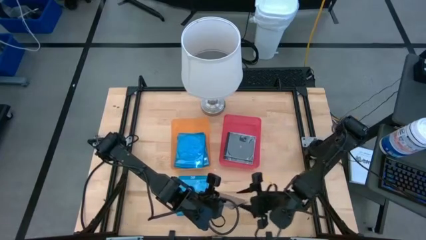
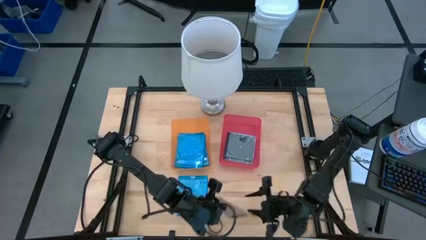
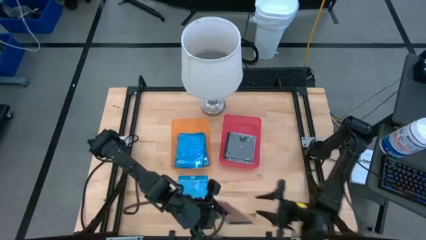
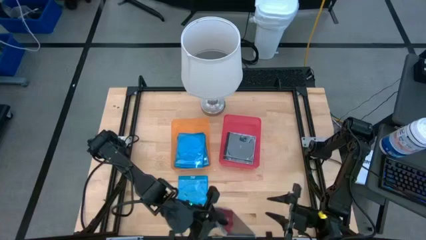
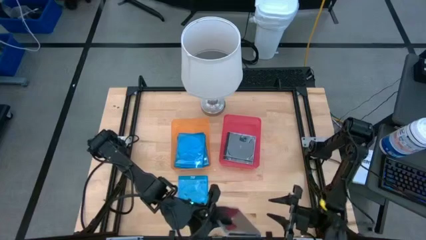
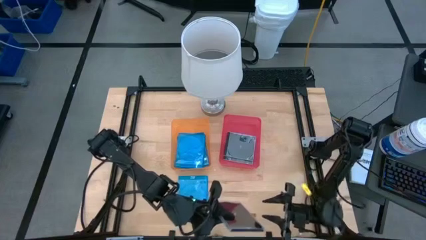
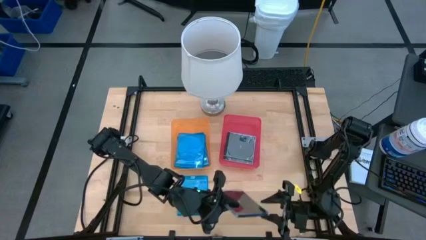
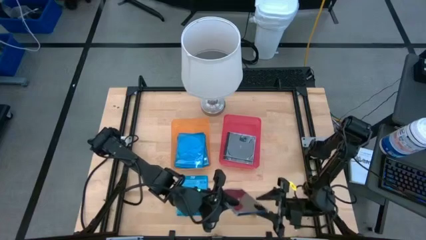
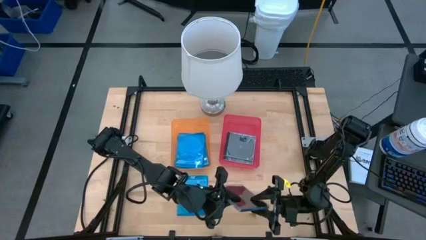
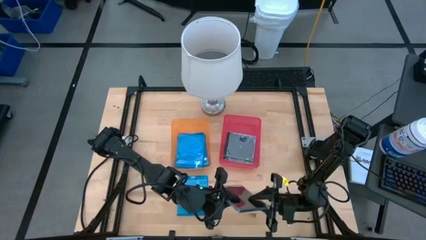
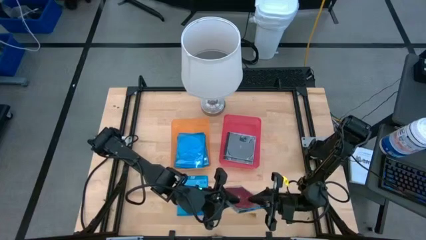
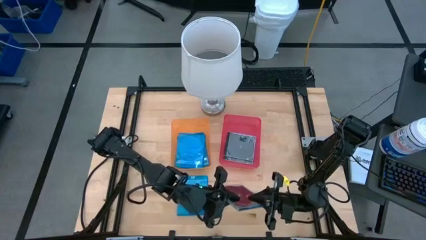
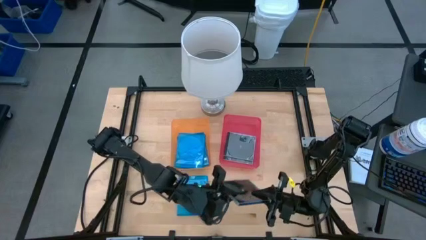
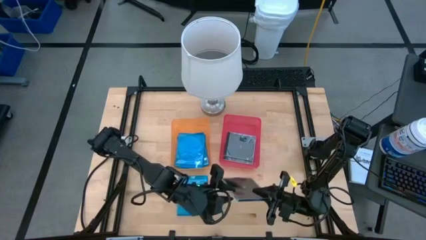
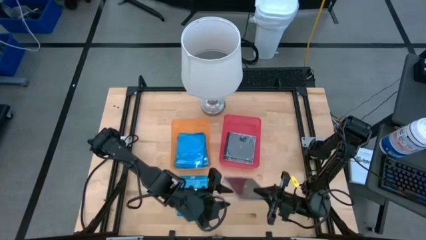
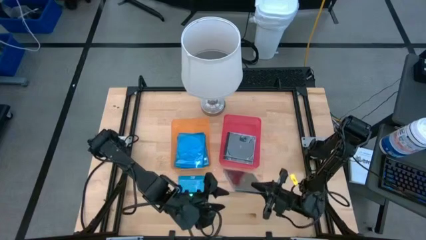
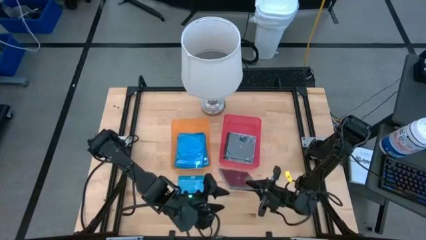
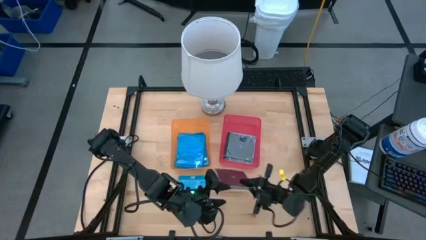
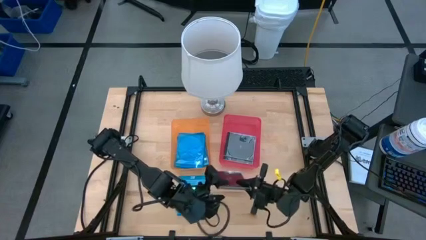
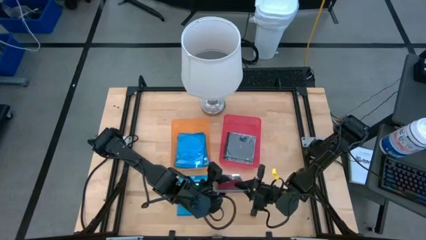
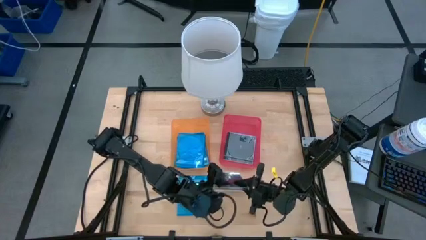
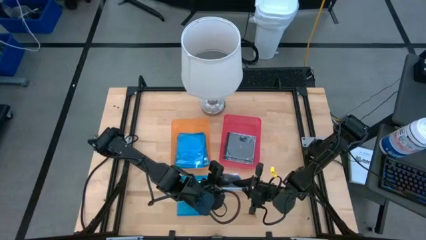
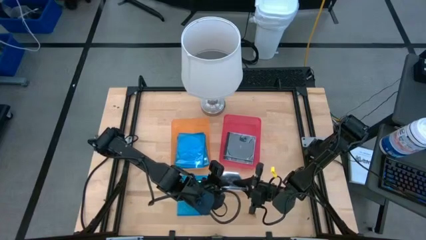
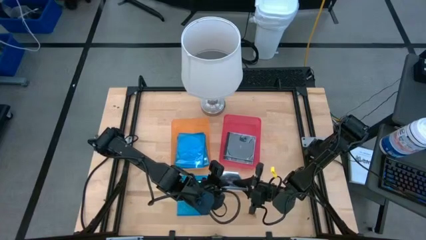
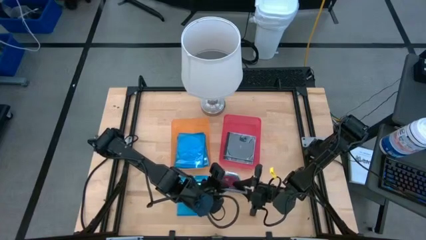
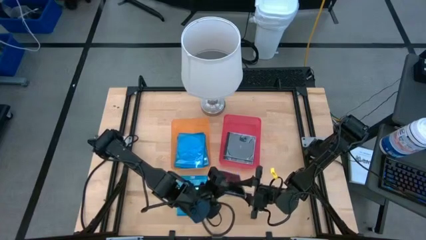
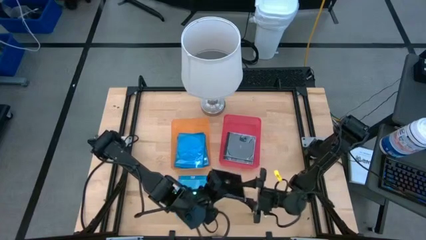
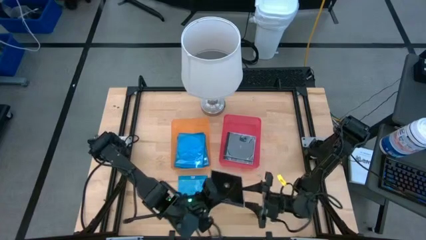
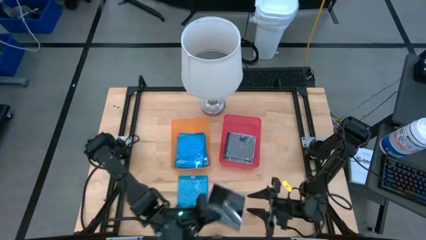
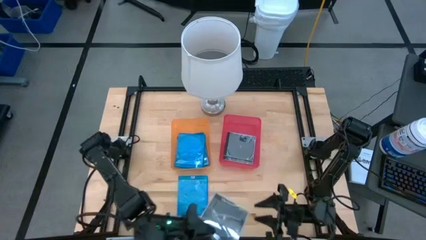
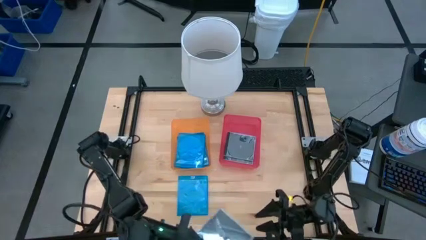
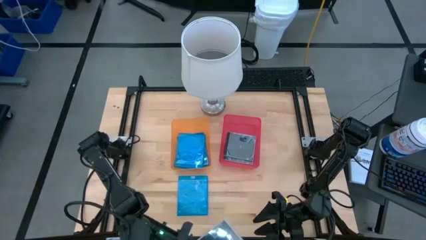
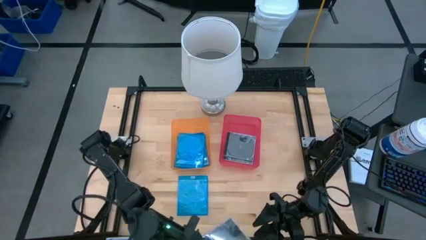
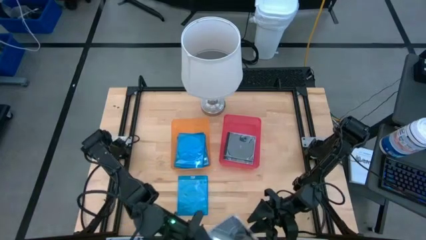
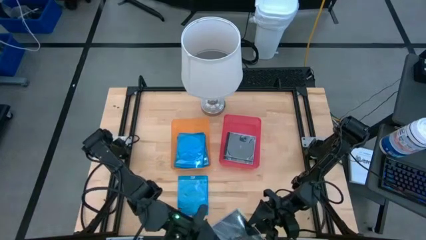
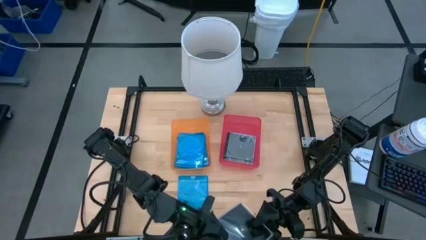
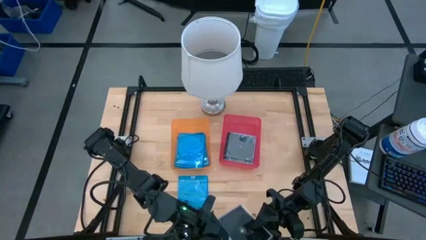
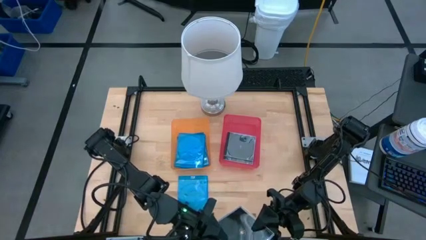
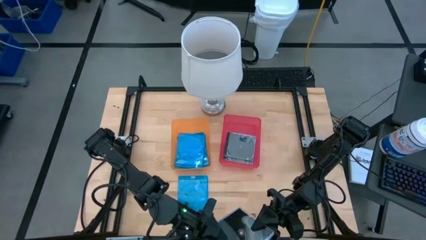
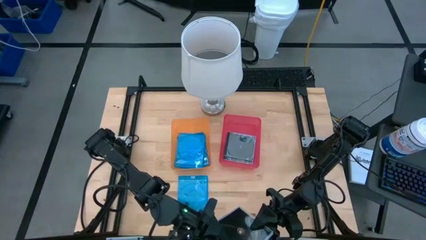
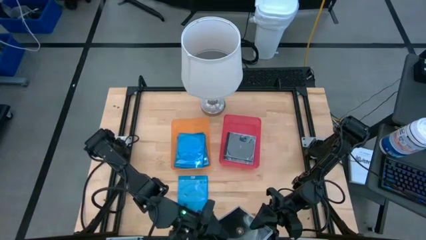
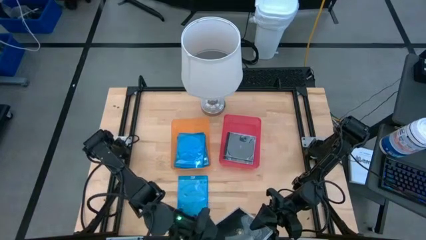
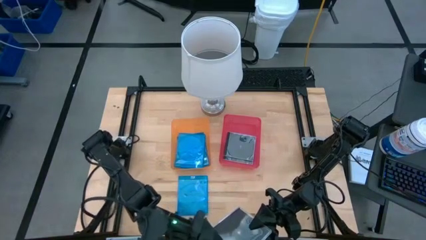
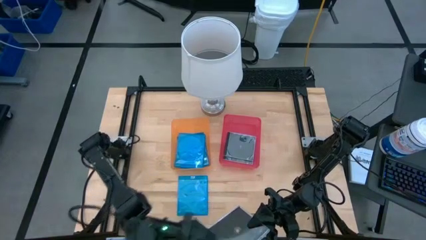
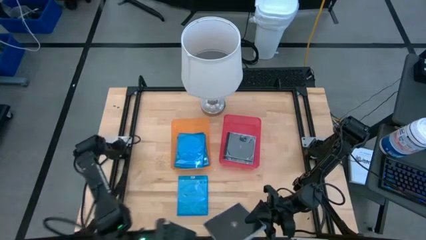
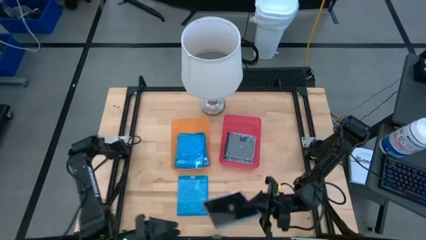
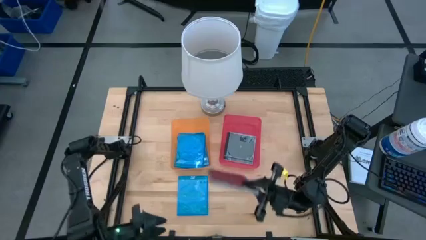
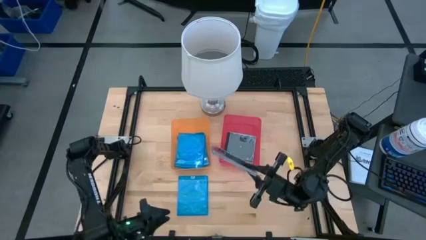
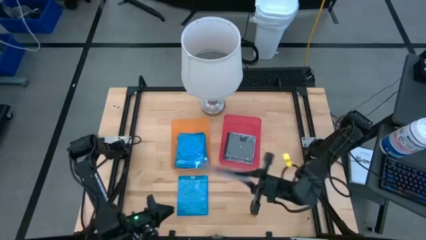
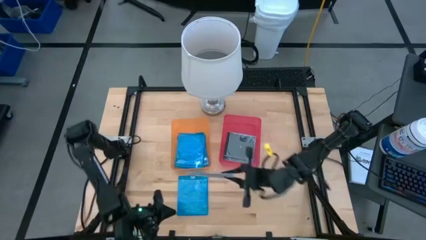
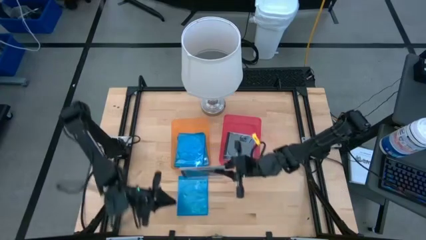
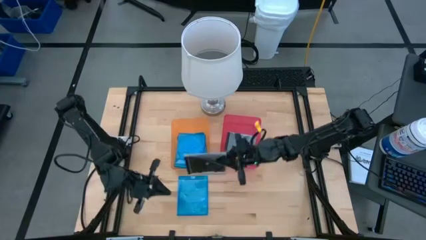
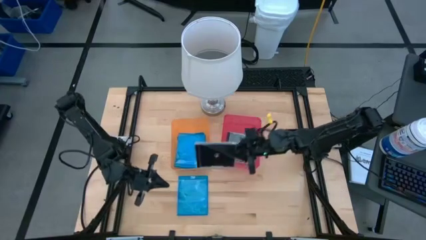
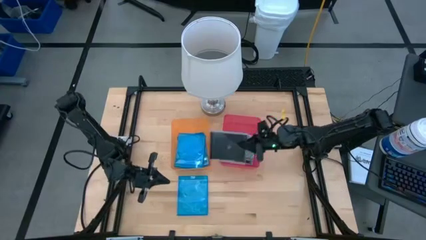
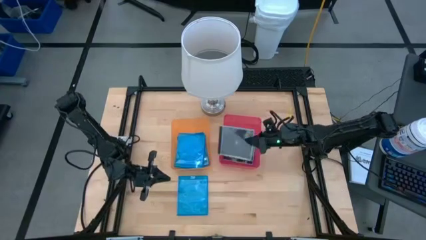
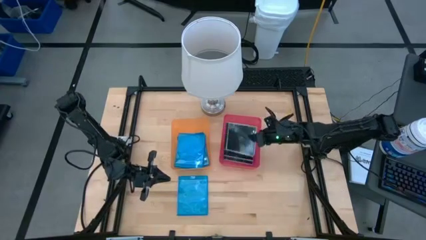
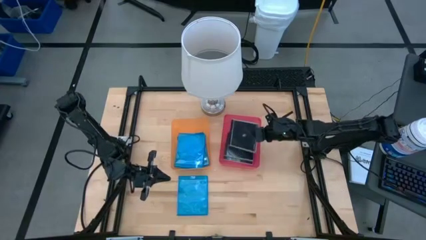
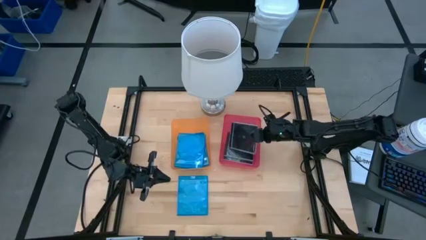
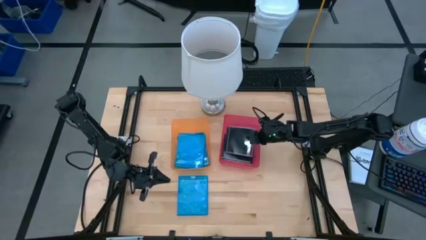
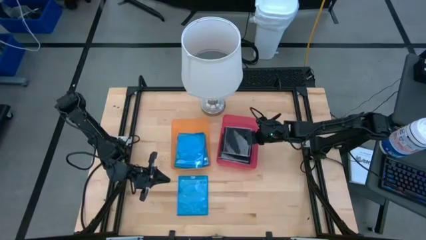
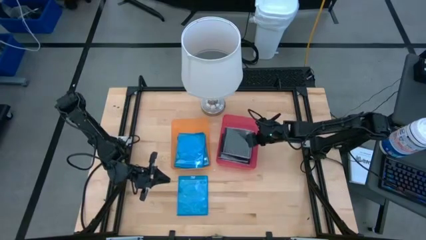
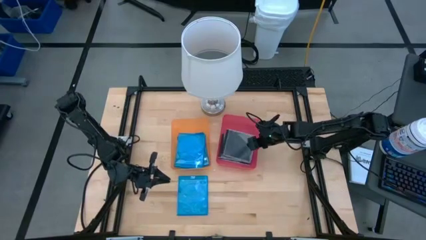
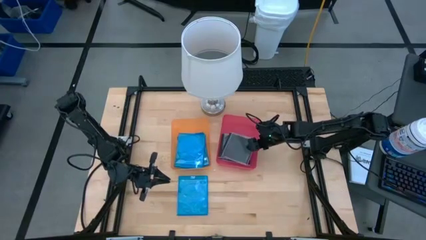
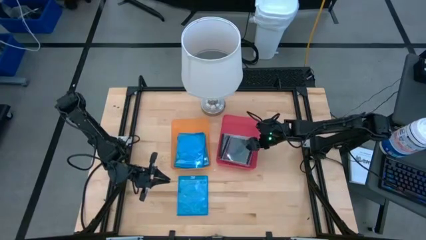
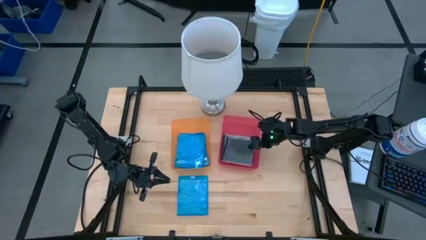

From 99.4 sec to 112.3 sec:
Task: Pick & place jewel cases by type
Put the black CD case into the red bin
